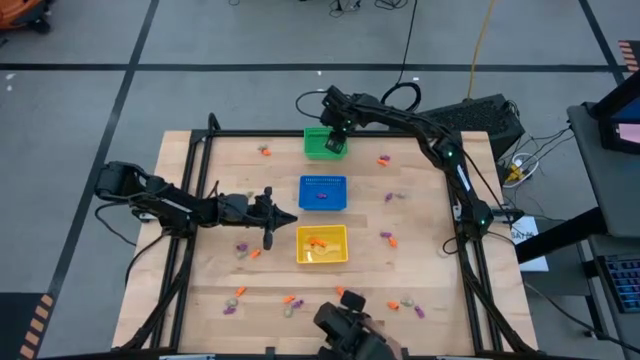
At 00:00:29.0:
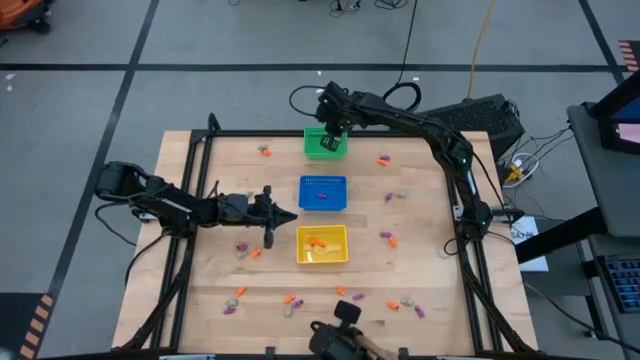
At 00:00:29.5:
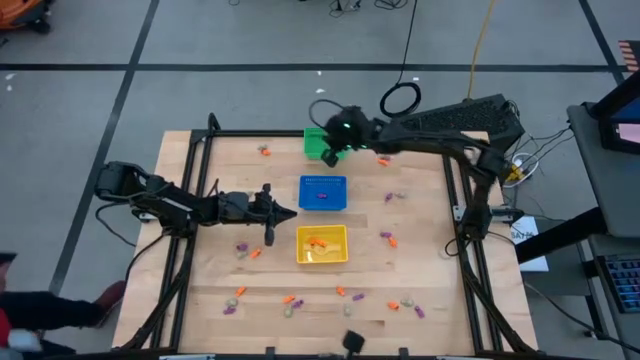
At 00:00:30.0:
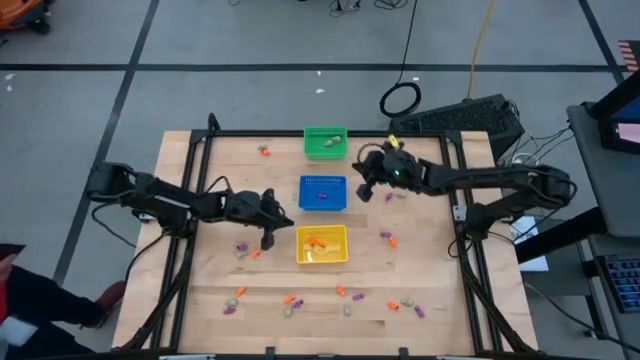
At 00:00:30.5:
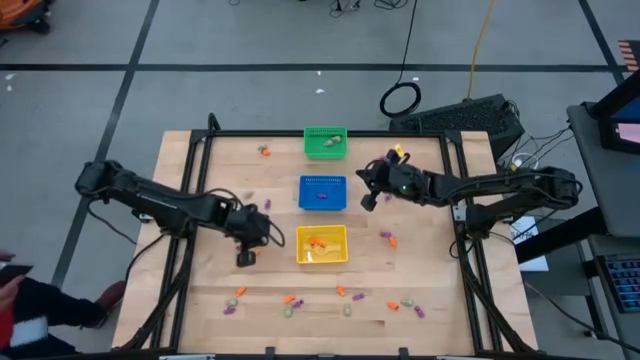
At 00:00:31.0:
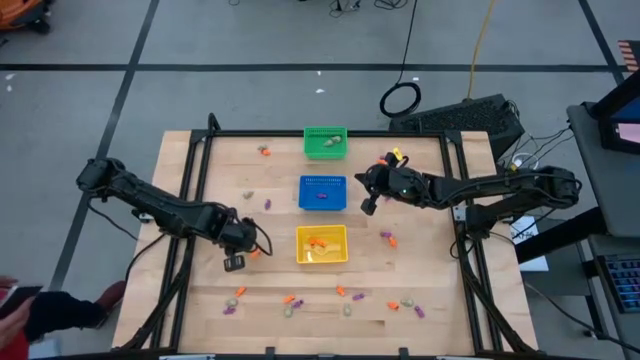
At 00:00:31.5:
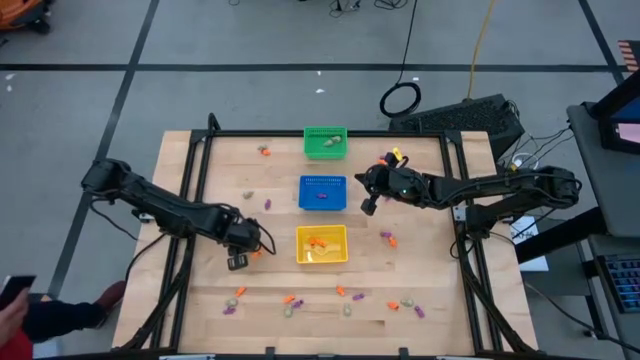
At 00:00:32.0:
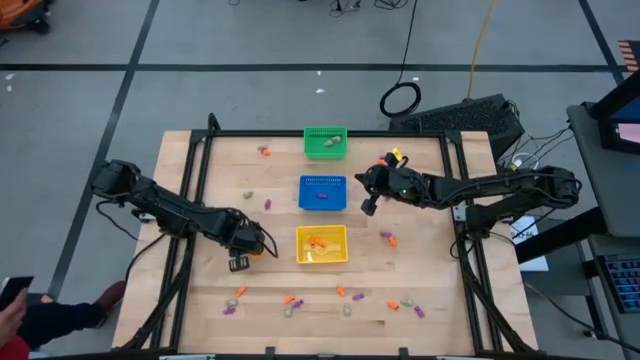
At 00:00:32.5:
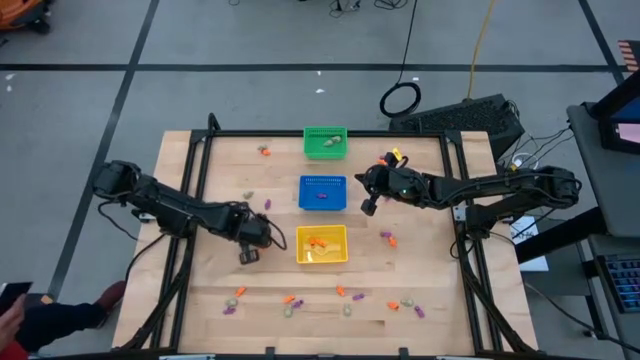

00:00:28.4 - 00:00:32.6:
Task: Sort Halloween decoration
Put the purple skeleton toy into the blue bin

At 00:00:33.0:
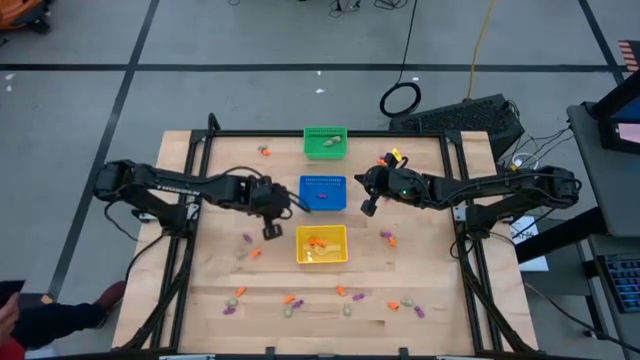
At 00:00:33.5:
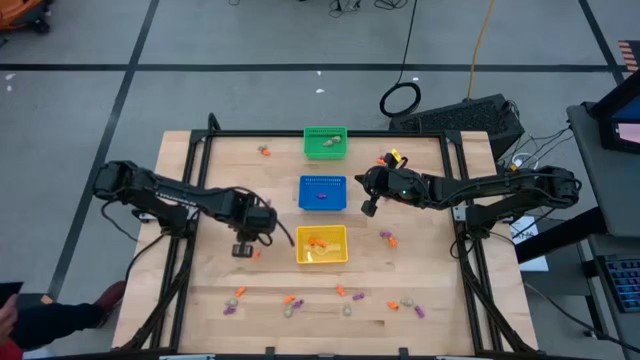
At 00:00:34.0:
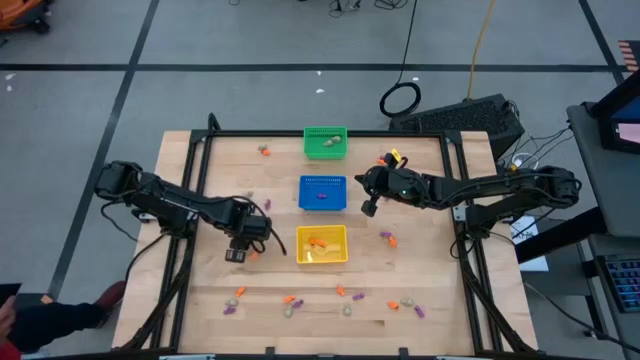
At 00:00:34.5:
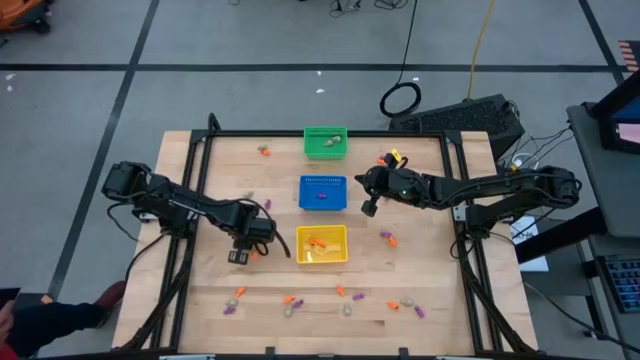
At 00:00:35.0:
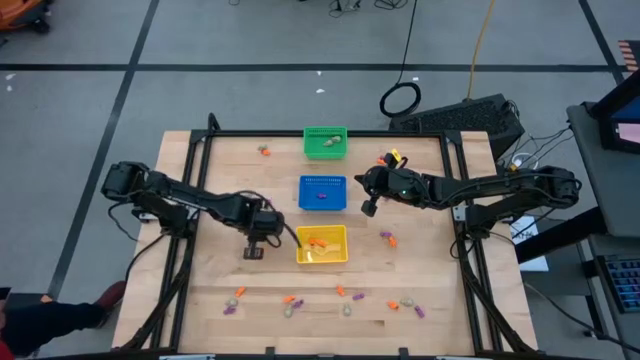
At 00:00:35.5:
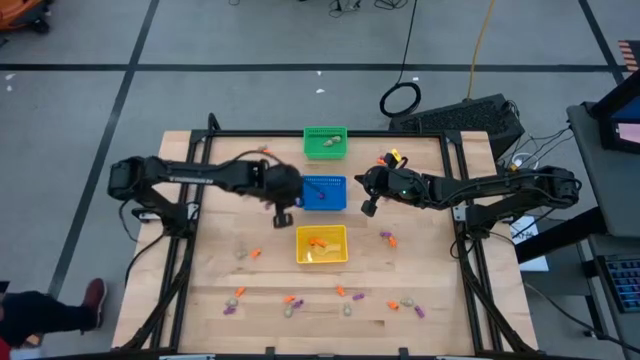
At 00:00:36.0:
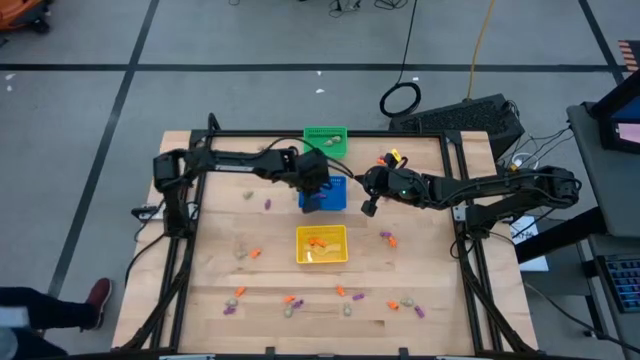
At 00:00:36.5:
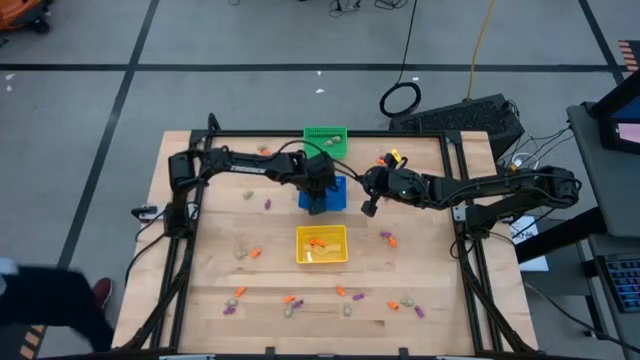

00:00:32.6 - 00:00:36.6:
Put the purple skeleton toy into the blue bin

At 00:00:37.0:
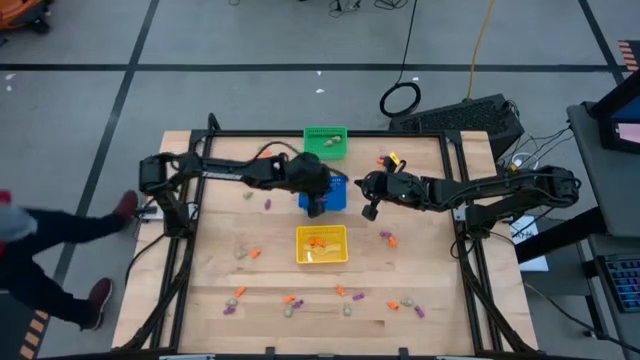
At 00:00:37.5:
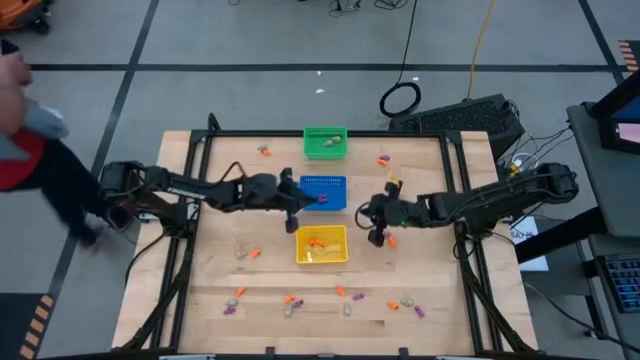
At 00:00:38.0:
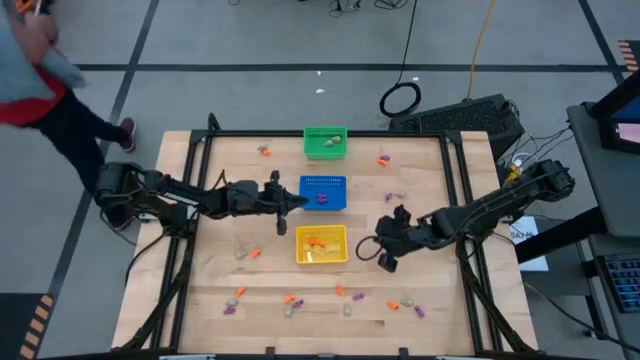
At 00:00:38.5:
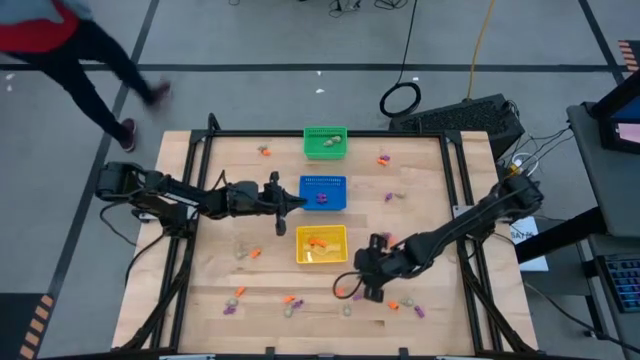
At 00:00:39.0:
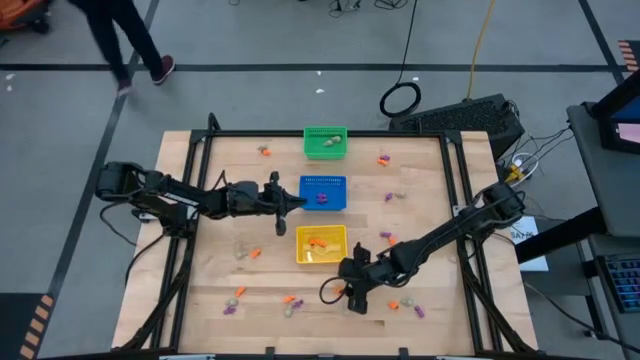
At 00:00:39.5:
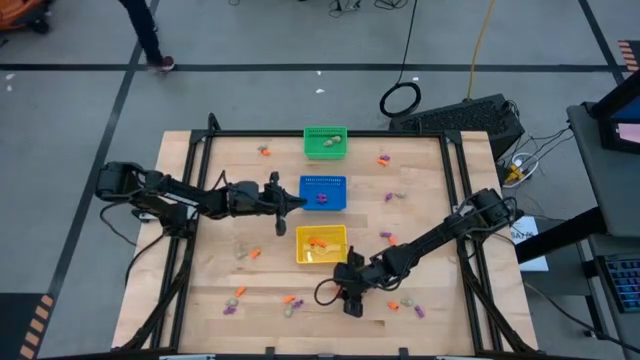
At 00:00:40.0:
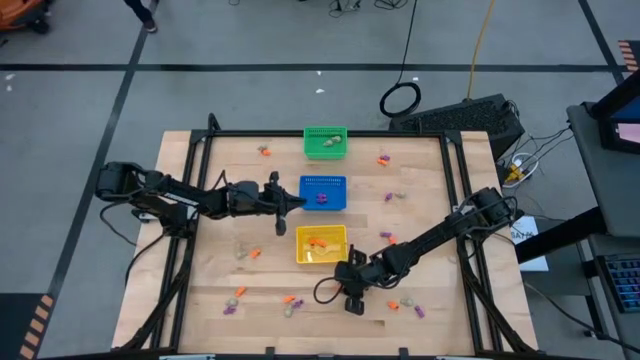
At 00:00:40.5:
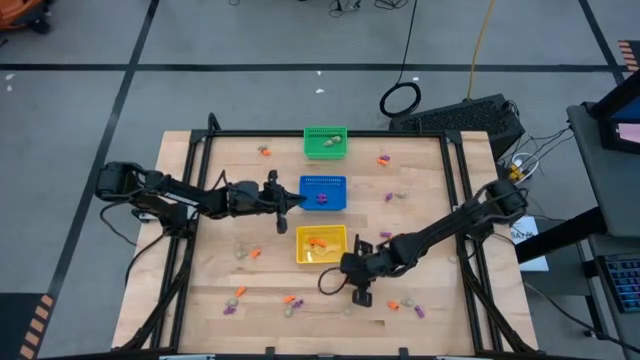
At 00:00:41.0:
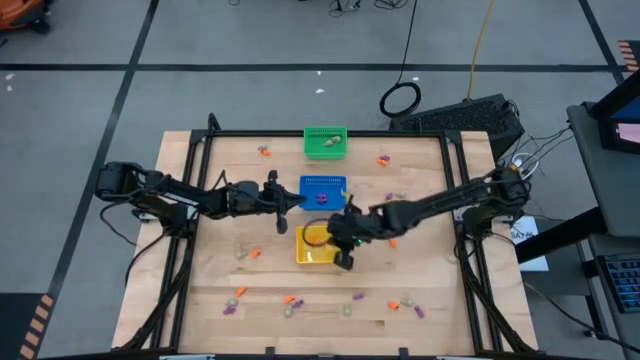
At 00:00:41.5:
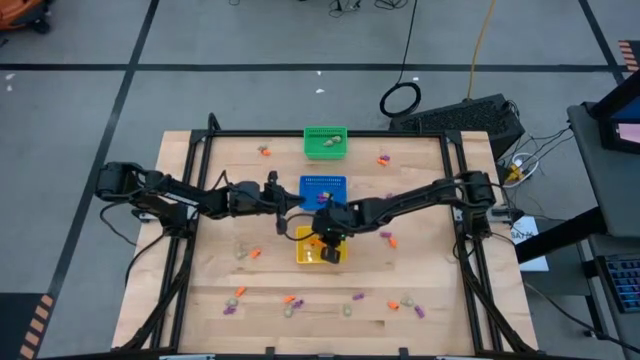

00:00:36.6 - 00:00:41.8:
Put the orange skeleton toy into the yellow bin

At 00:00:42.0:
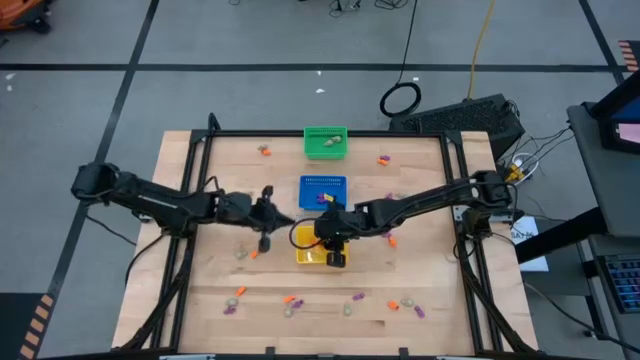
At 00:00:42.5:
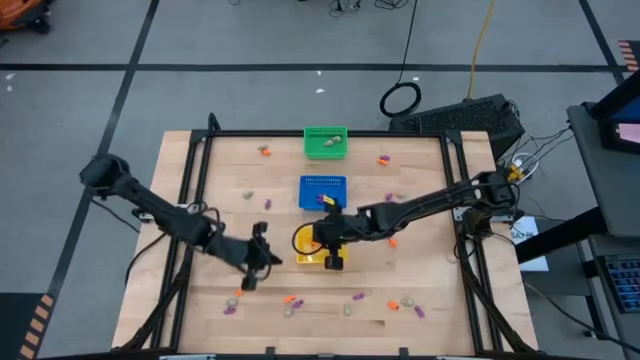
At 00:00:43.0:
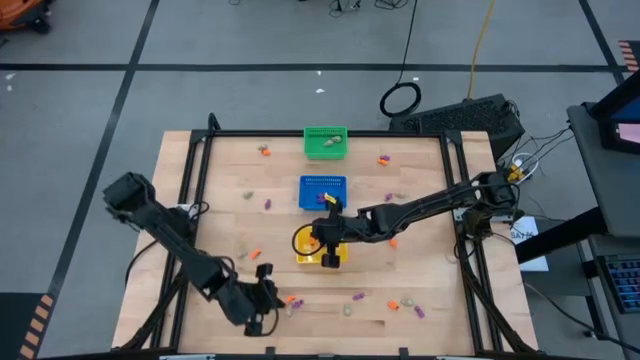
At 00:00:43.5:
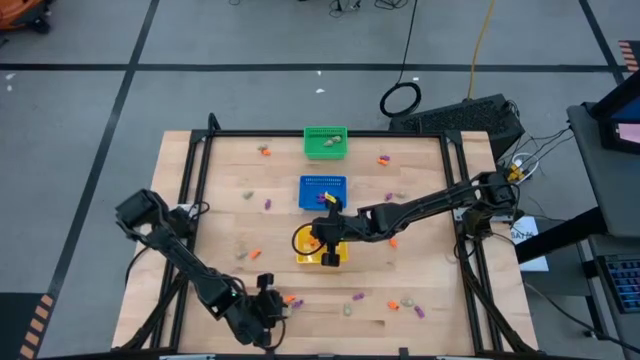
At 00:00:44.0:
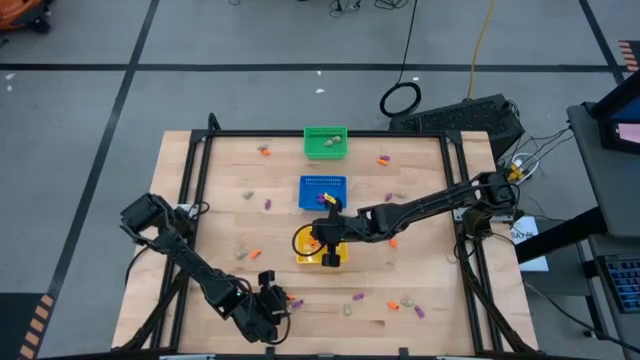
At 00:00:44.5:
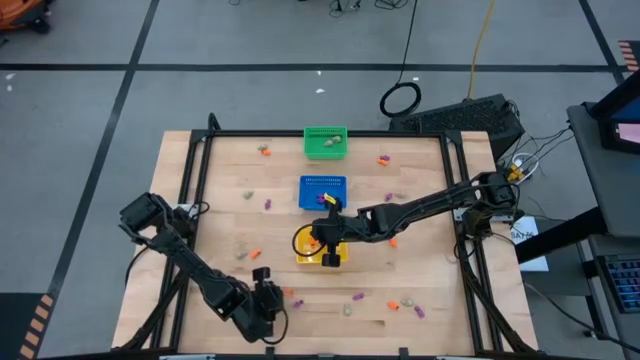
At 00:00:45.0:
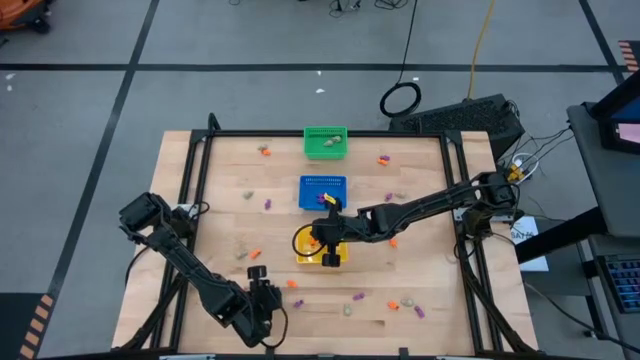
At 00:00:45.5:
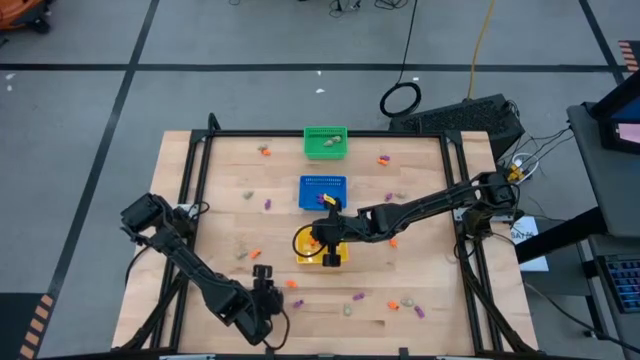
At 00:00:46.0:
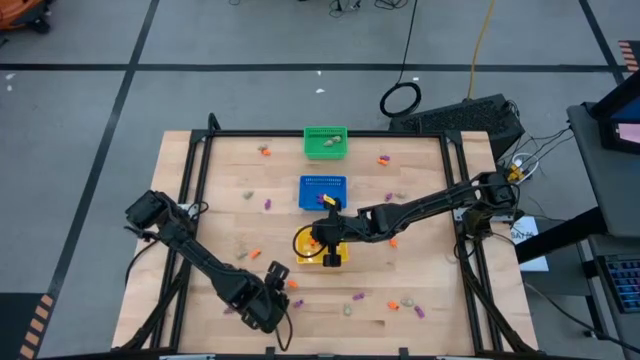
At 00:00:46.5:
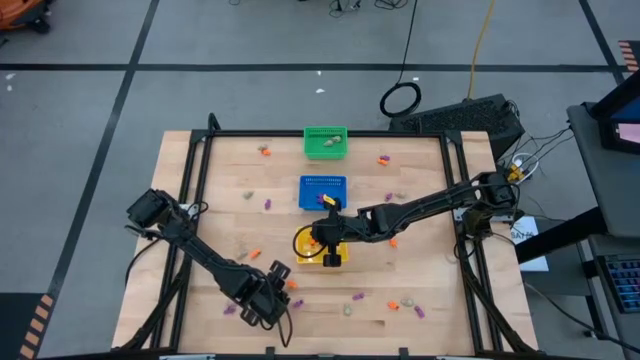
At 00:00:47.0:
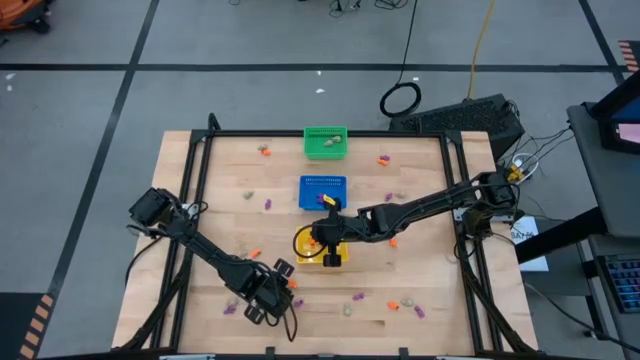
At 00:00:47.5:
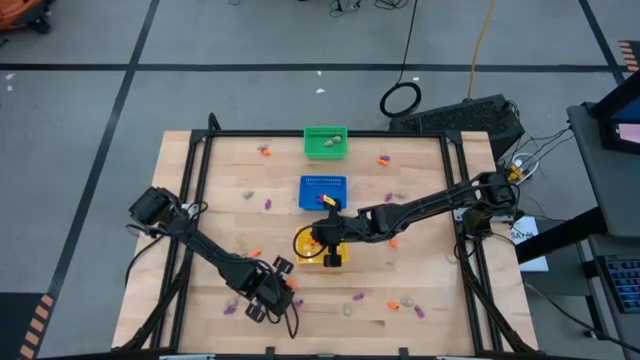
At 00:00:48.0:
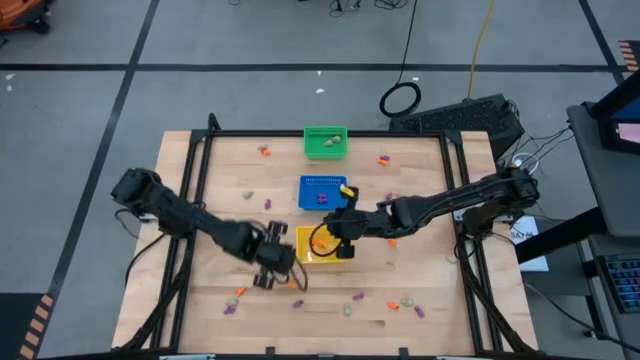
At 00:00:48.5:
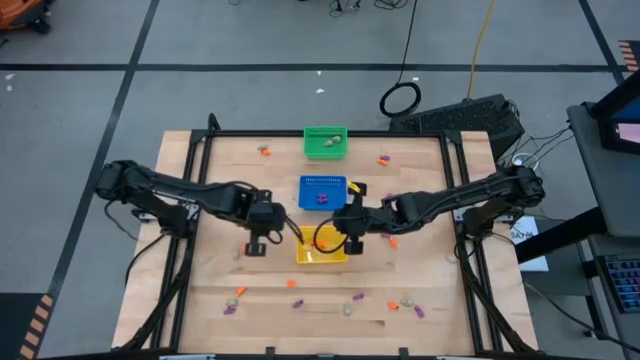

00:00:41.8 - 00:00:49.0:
Put the white skull toy into the green bin
